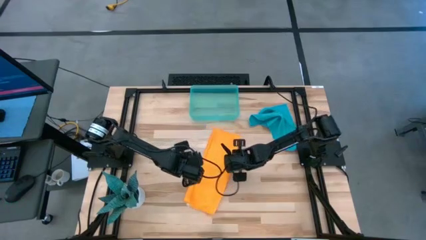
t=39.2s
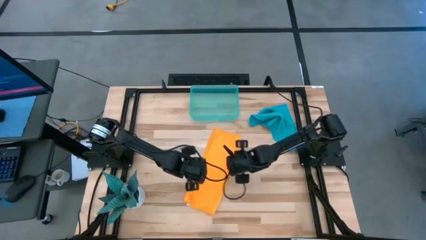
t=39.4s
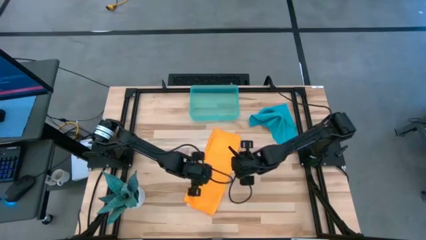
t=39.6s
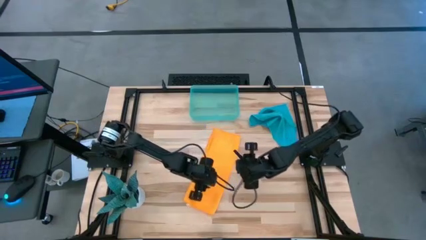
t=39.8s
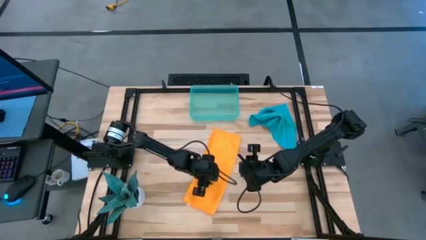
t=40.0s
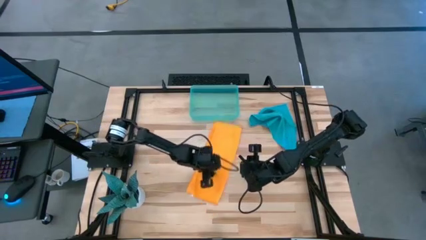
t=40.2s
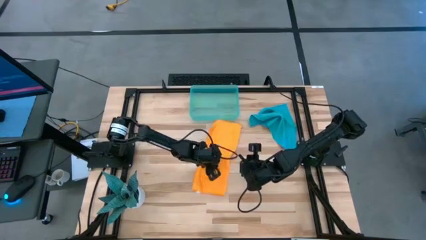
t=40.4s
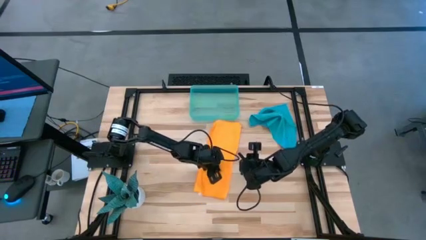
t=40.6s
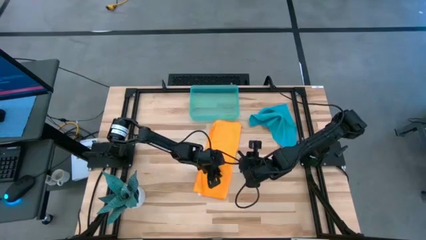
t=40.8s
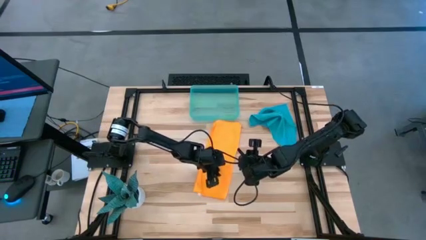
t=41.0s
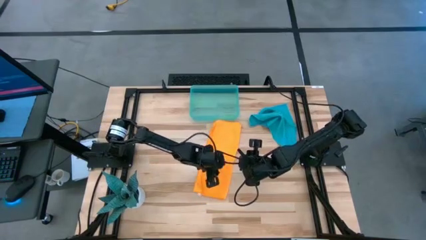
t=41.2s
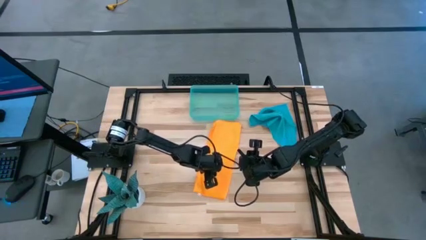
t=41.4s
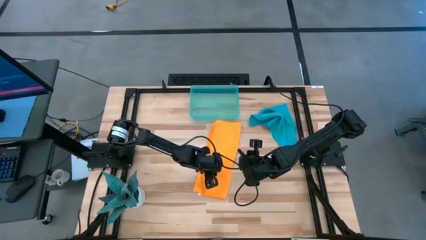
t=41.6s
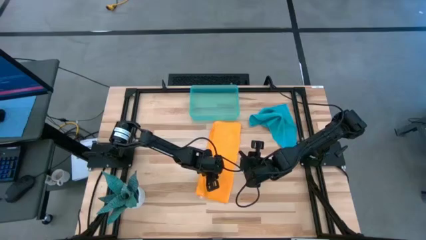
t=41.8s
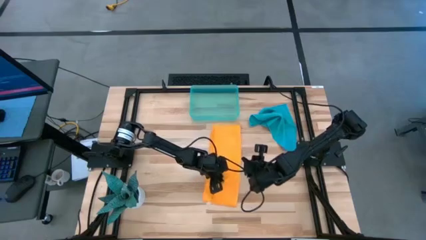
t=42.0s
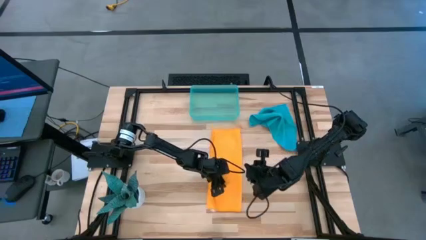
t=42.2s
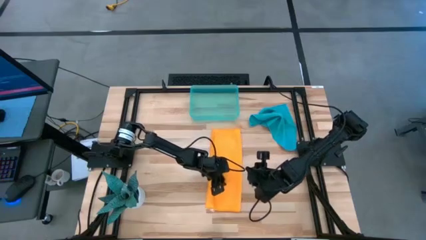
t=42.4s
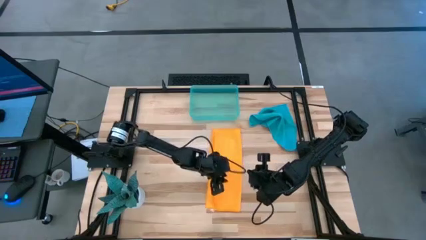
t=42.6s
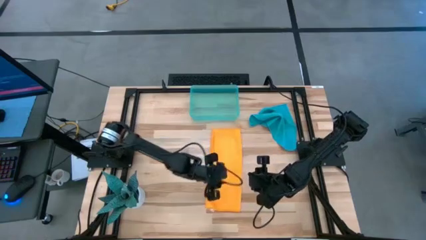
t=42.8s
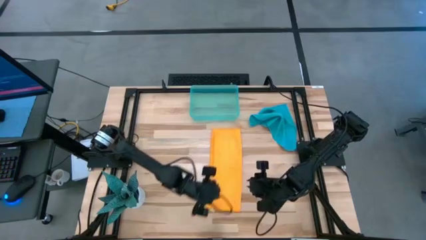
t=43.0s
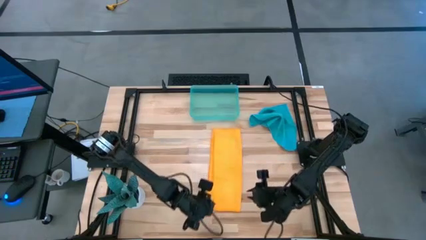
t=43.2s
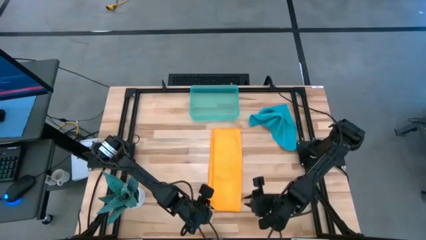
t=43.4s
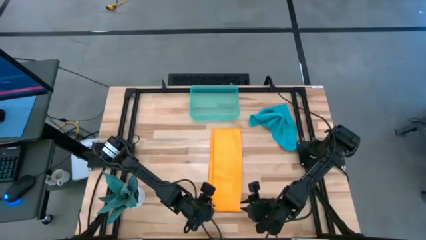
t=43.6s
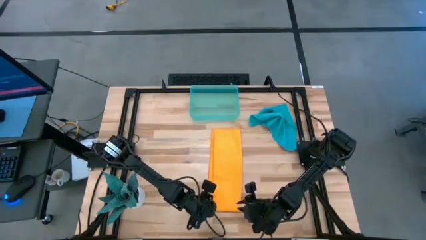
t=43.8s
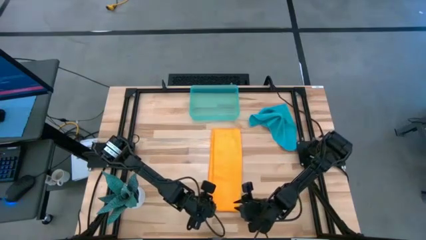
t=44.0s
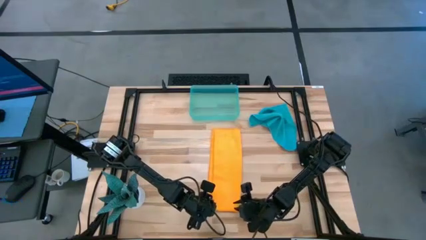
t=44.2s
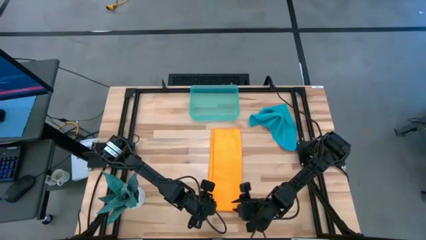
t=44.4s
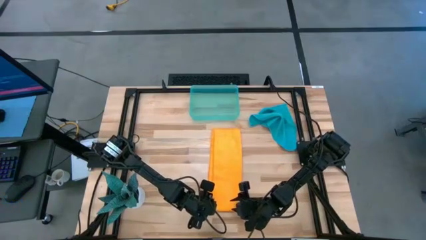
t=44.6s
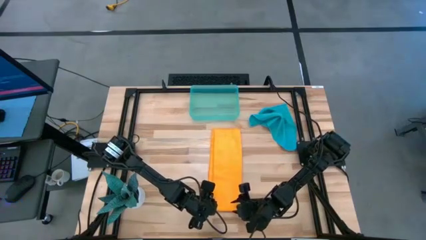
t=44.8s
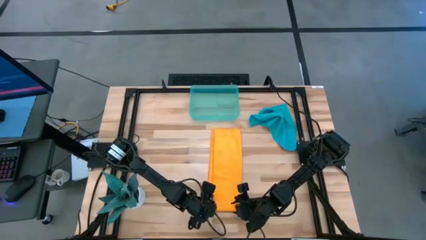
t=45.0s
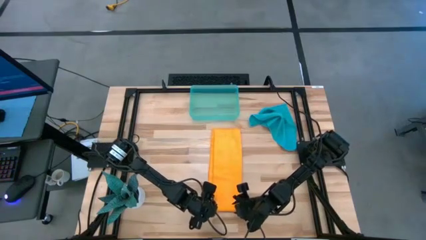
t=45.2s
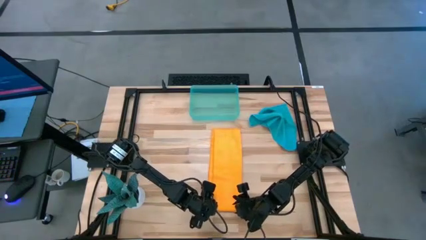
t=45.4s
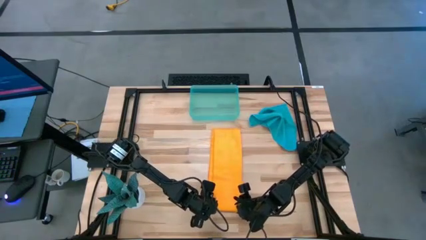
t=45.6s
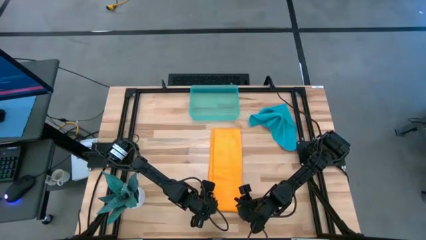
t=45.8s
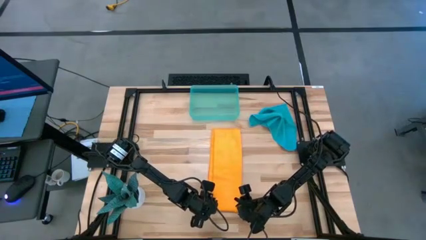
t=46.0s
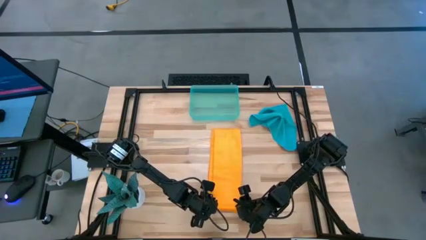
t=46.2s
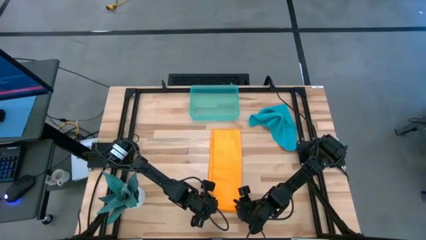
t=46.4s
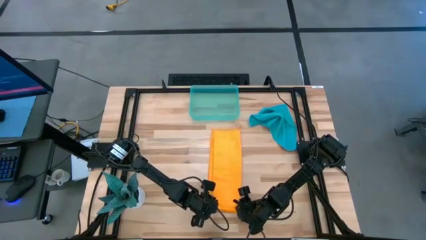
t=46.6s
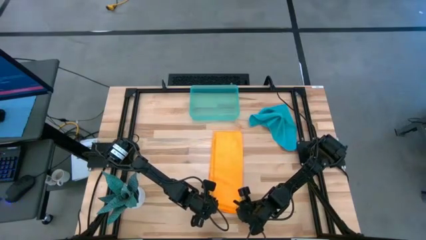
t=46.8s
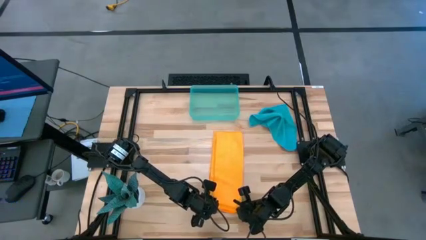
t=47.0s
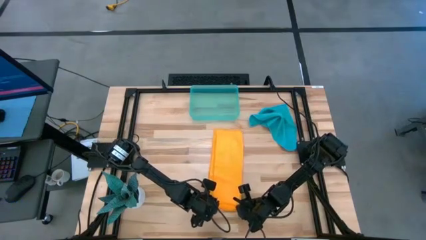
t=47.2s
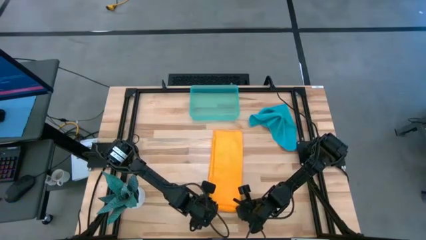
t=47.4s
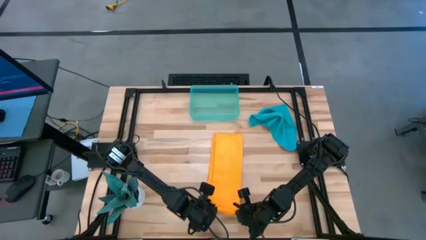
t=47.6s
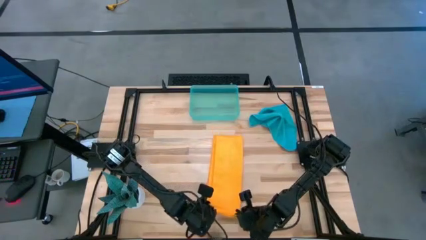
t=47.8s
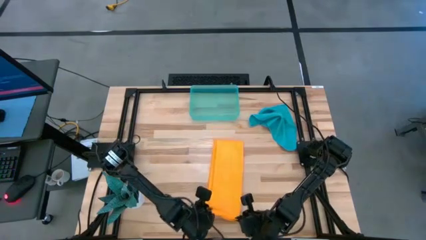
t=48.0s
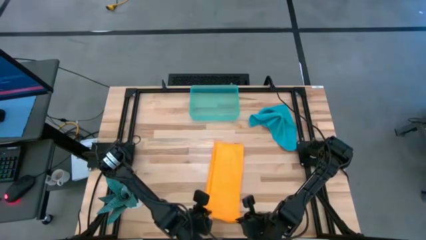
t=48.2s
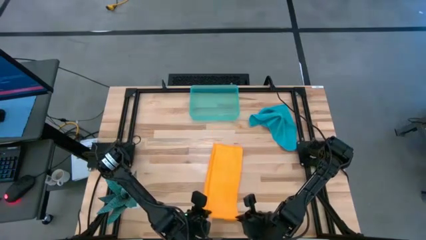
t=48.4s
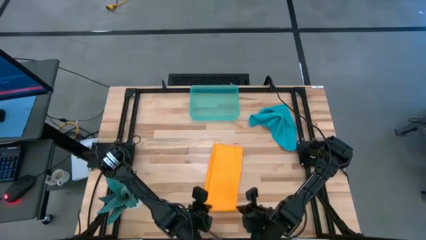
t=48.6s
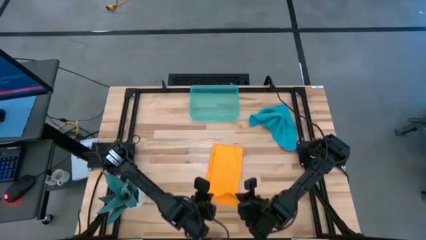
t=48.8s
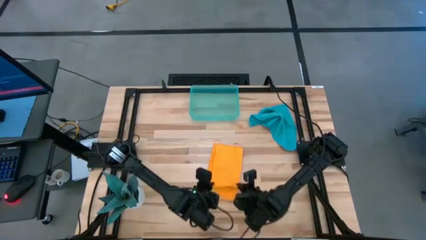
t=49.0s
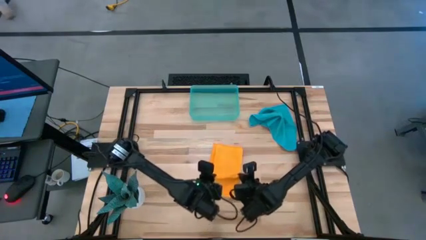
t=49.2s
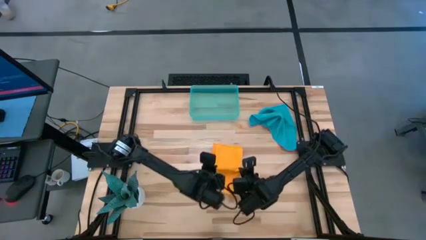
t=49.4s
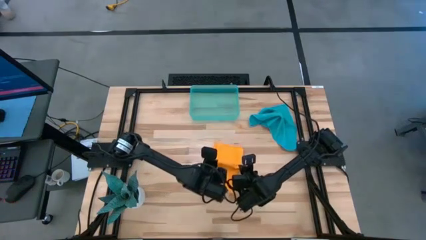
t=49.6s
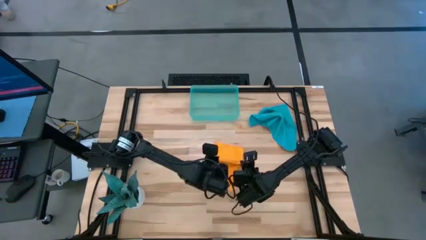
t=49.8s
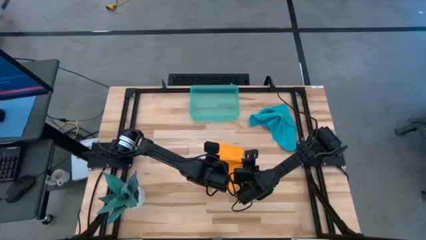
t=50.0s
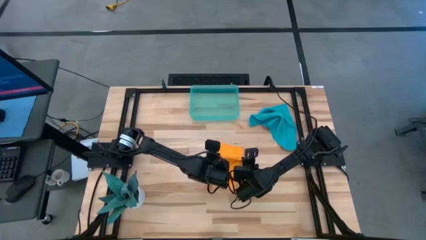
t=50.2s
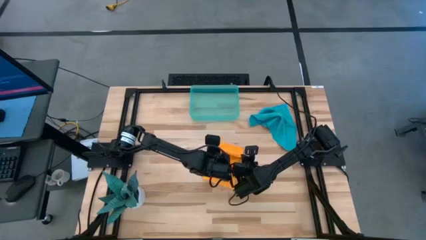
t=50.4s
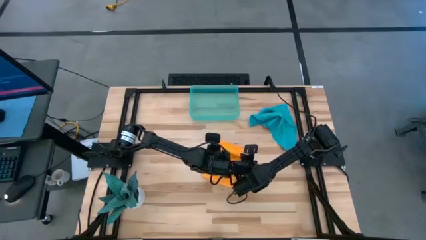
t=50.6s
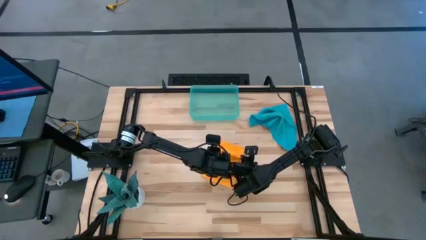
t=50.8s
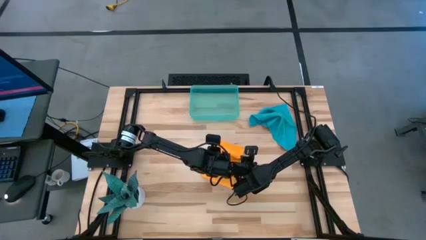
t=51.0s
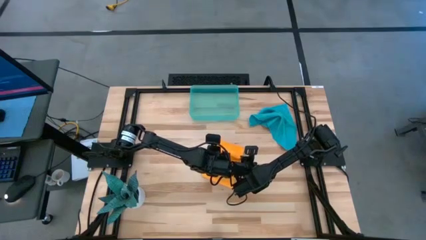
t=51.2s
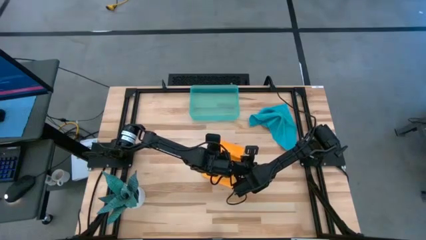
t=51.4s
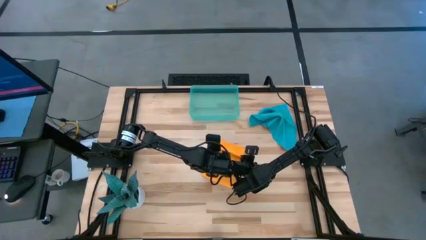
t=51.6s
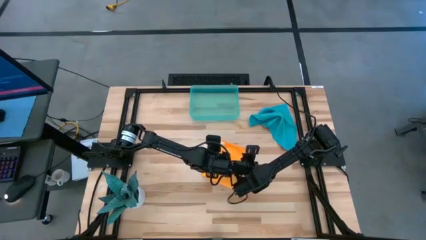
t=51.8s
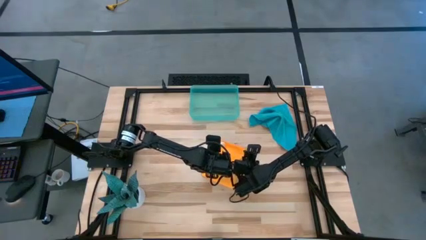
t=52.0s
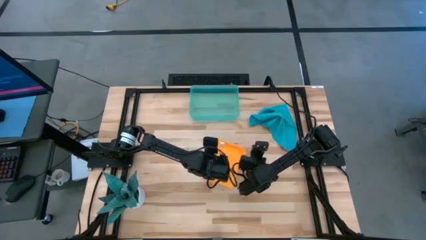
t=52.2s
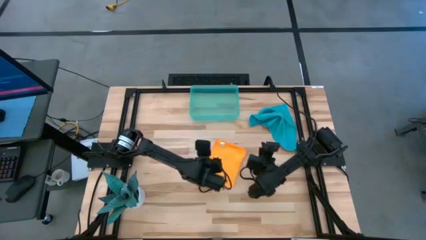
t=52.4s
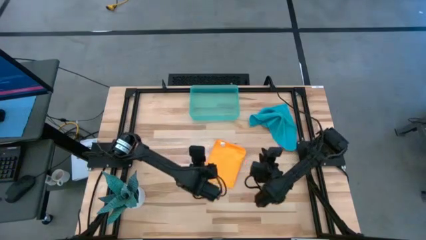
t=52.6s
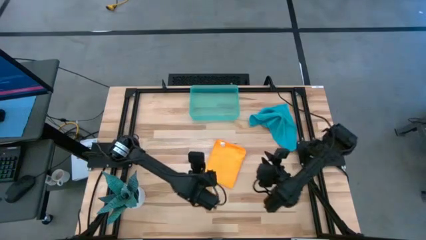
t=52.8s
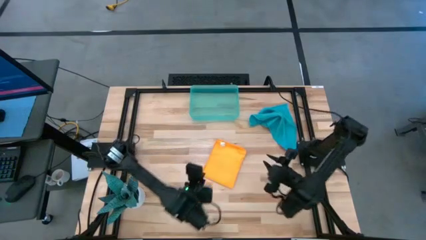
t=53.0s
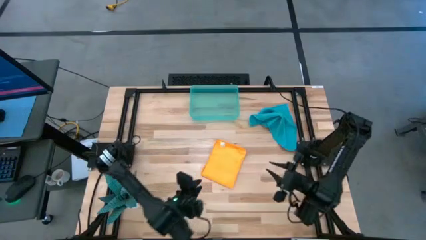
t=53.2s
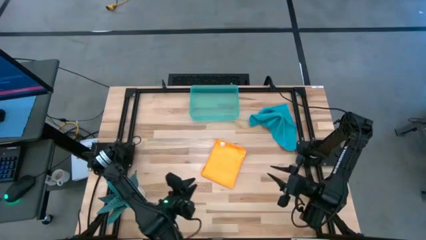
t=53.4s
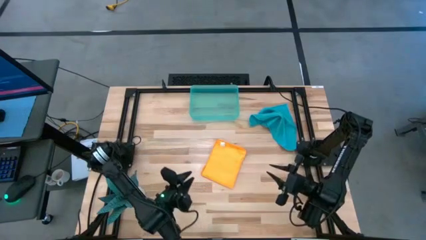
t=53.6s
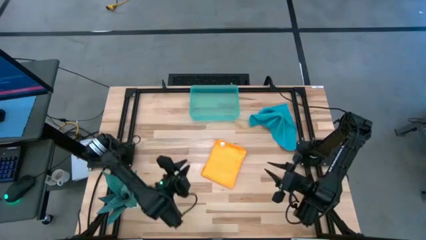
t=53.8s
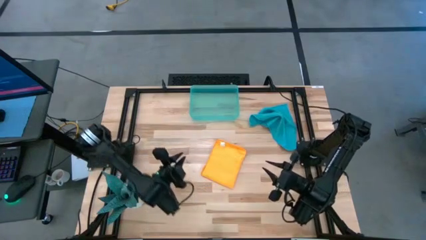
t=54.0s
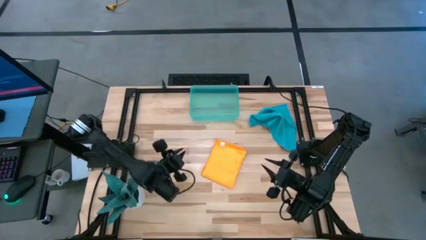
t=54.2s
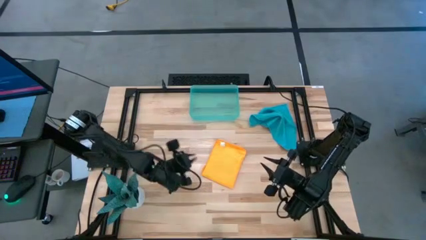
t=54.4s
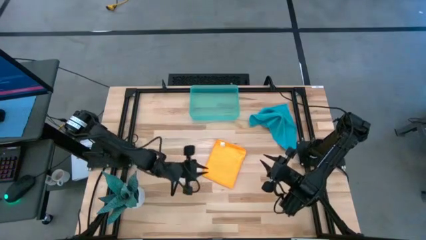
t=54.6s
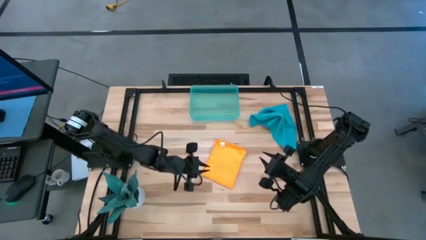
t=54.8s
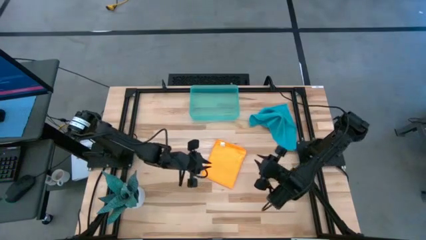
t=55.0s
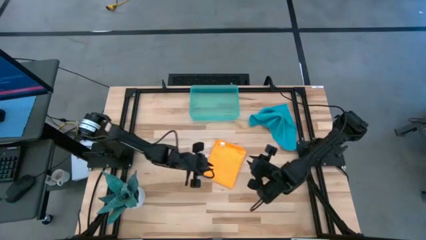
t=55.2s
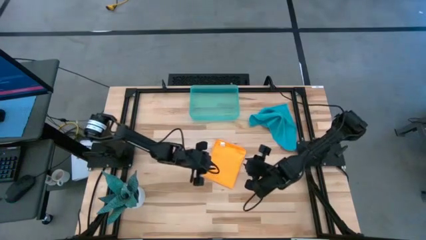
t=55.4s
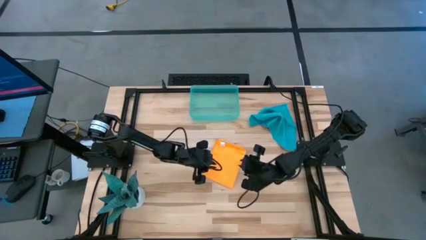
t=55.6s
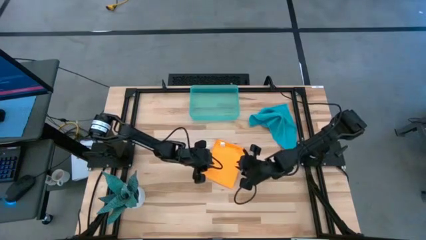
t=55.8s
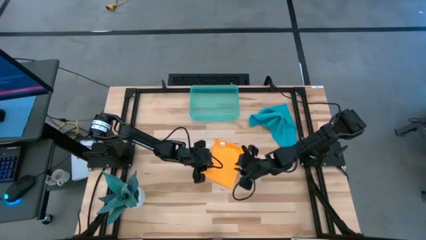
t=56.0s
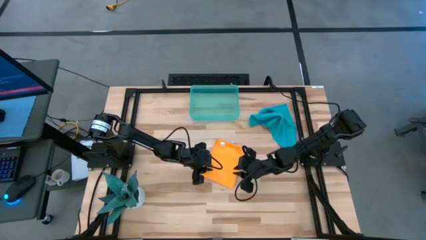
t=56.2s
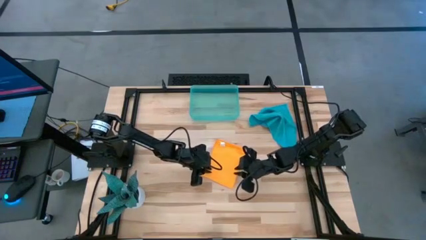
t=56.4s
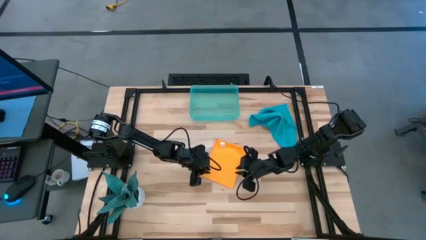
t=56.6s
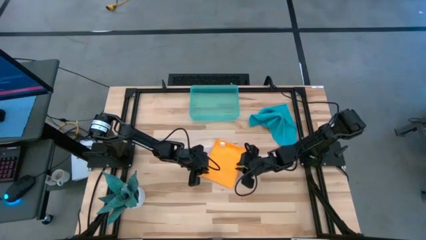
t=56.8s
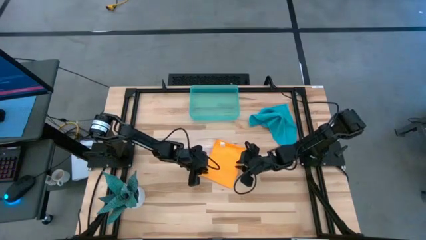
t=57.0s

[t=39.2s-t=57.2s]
Task: Roll microfiber towels into tight, uniform cylinder then place into a basket
Roll the yellow microfiber cloth on the table
